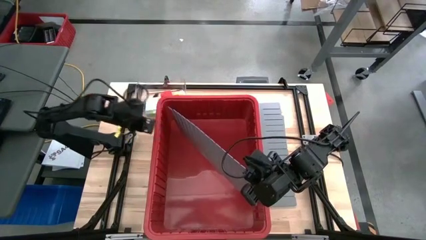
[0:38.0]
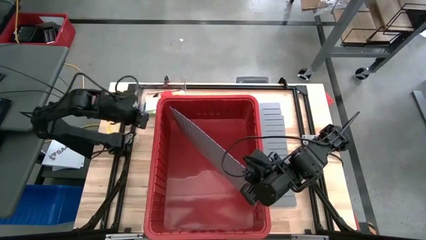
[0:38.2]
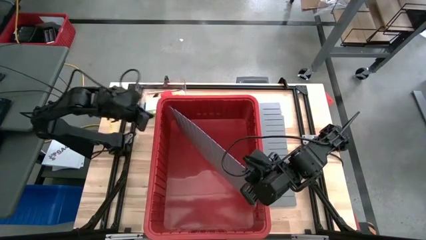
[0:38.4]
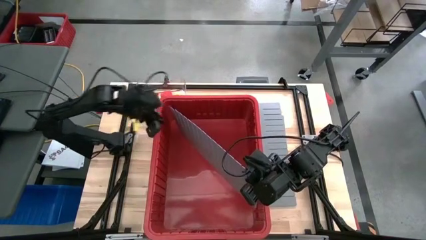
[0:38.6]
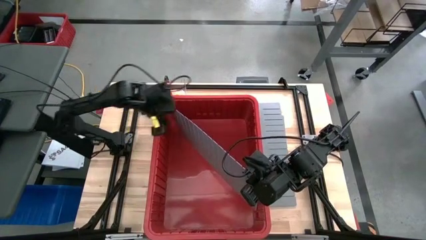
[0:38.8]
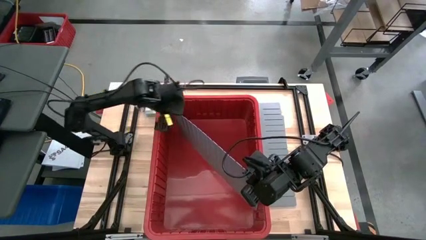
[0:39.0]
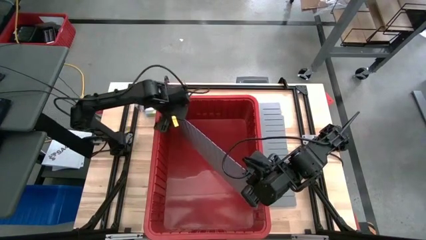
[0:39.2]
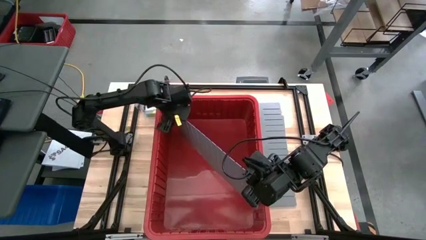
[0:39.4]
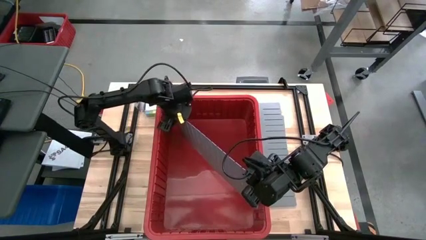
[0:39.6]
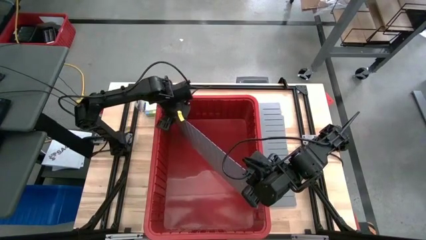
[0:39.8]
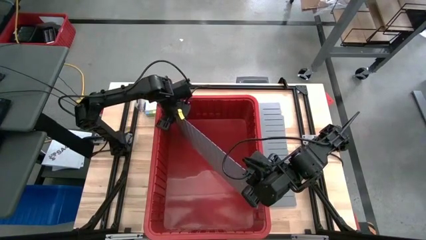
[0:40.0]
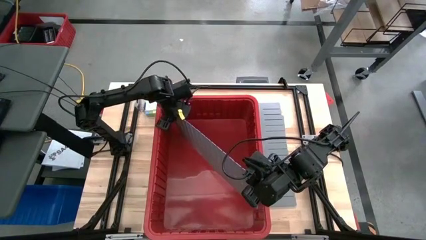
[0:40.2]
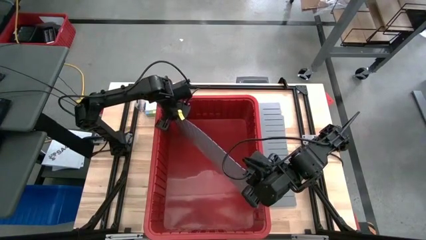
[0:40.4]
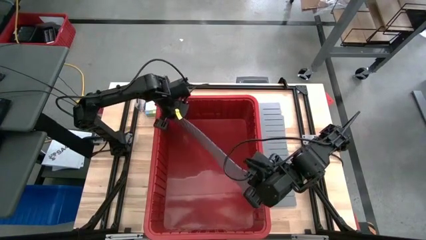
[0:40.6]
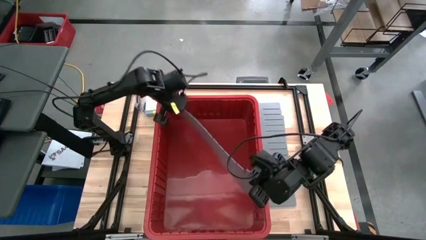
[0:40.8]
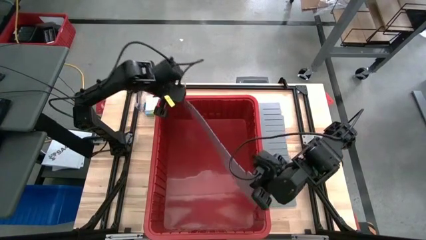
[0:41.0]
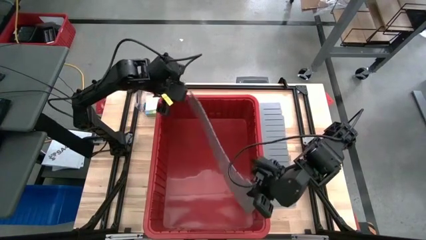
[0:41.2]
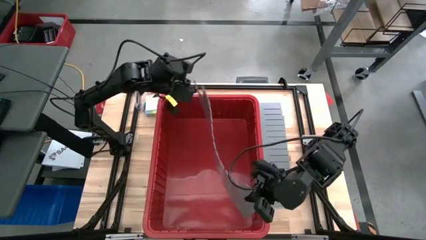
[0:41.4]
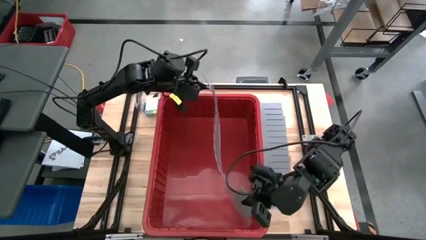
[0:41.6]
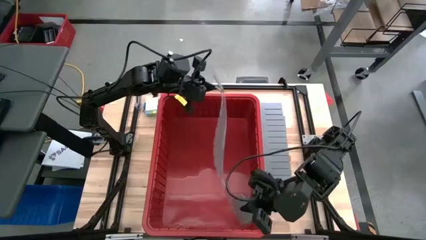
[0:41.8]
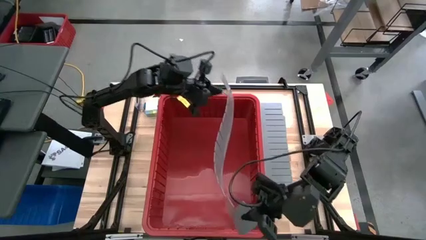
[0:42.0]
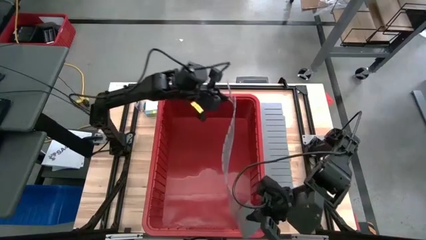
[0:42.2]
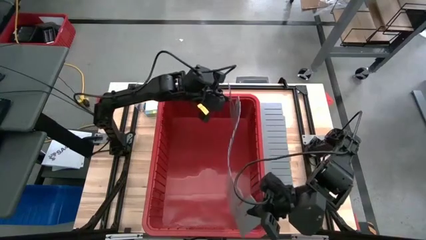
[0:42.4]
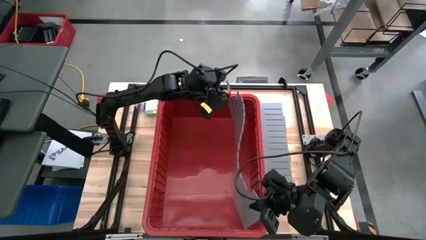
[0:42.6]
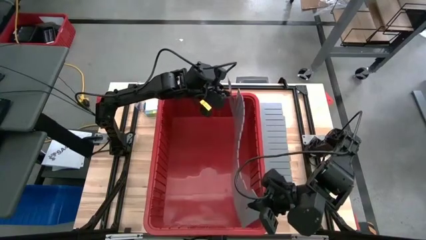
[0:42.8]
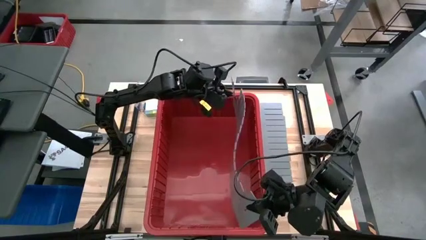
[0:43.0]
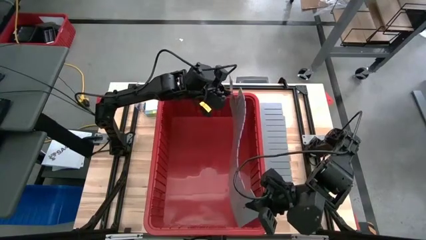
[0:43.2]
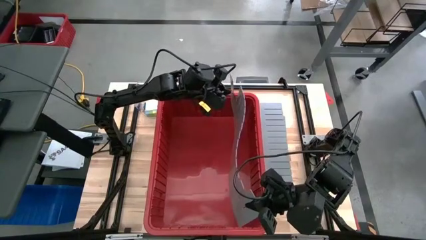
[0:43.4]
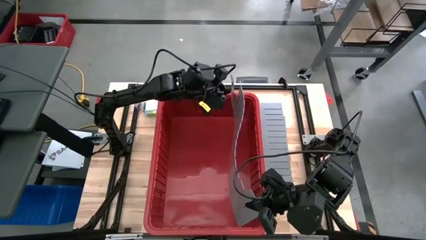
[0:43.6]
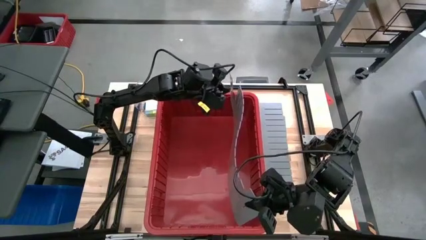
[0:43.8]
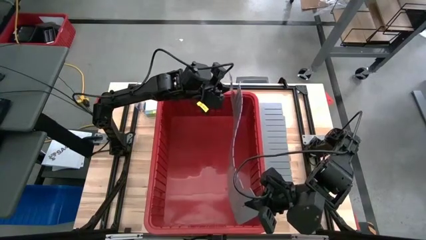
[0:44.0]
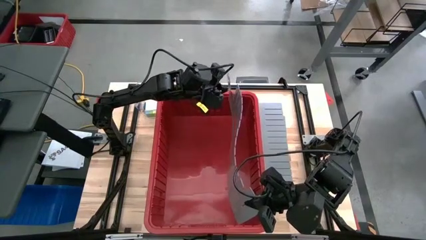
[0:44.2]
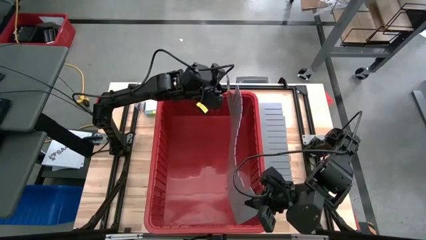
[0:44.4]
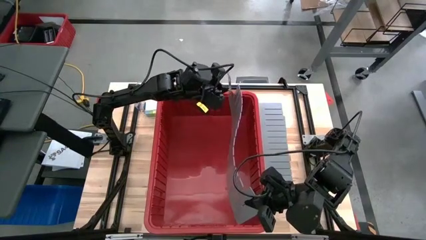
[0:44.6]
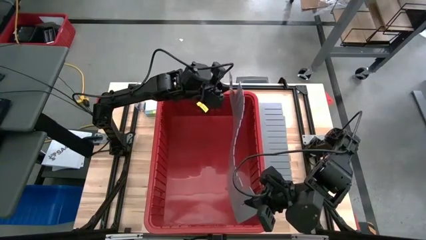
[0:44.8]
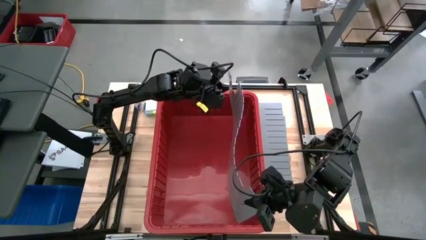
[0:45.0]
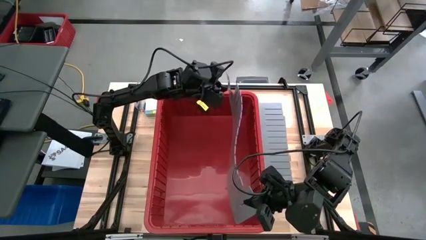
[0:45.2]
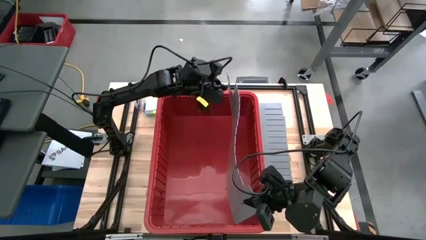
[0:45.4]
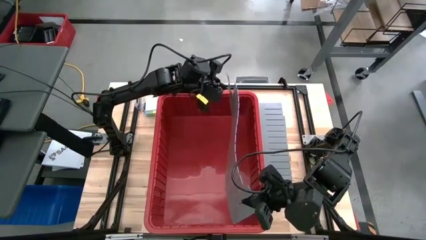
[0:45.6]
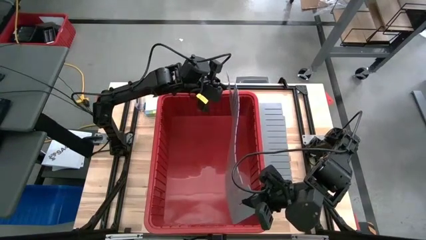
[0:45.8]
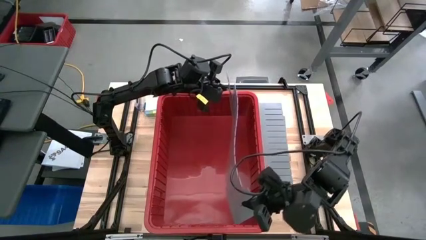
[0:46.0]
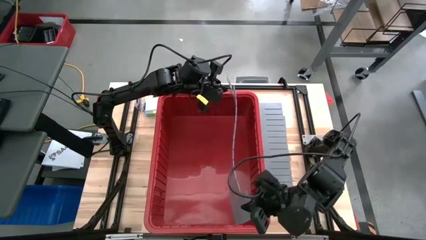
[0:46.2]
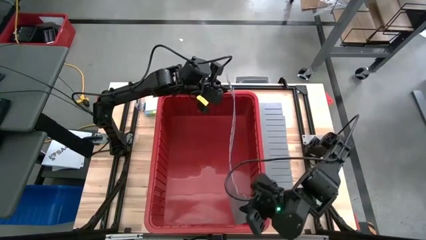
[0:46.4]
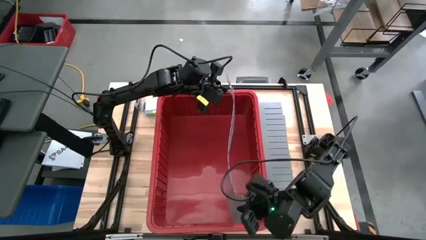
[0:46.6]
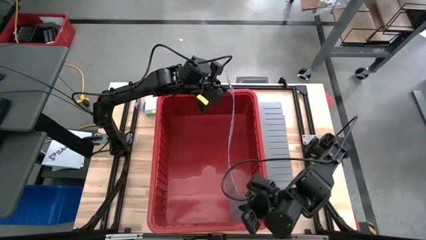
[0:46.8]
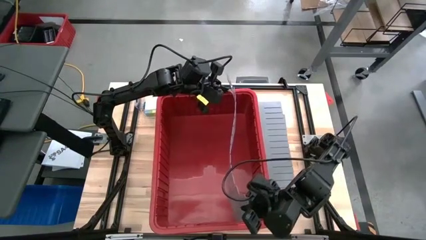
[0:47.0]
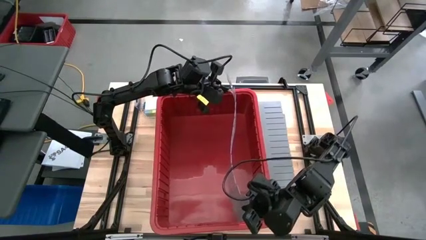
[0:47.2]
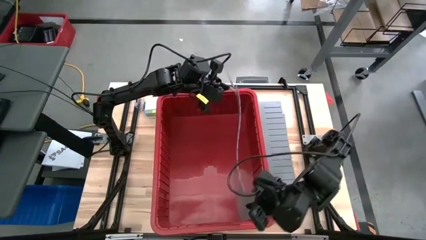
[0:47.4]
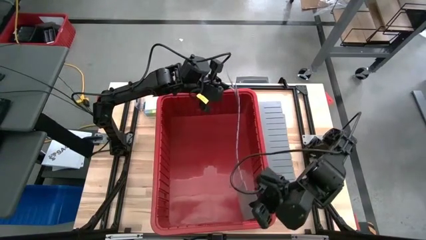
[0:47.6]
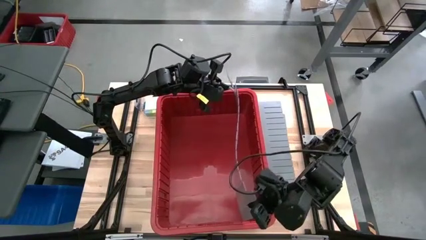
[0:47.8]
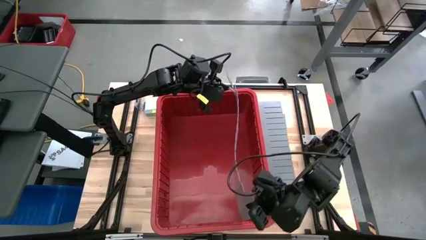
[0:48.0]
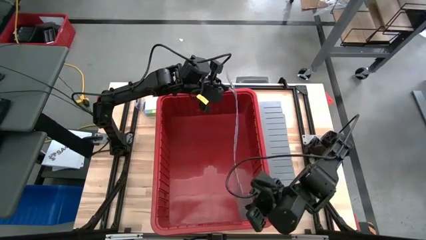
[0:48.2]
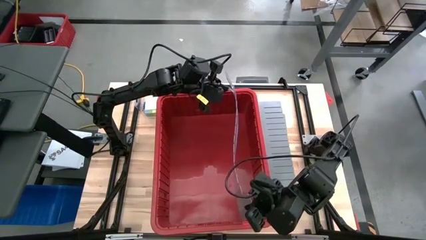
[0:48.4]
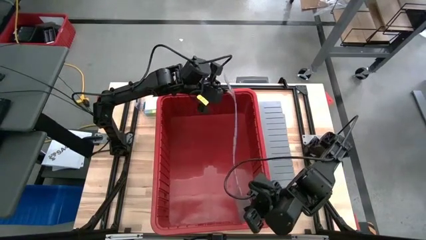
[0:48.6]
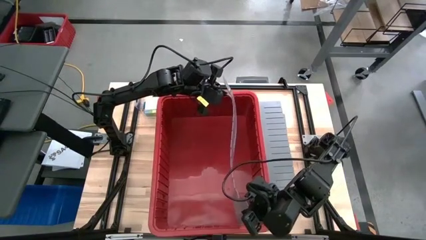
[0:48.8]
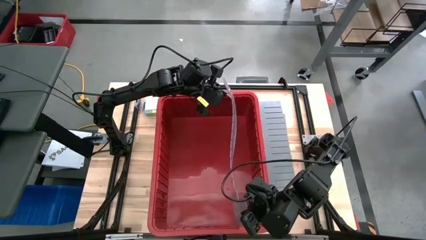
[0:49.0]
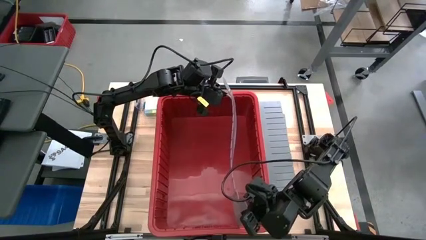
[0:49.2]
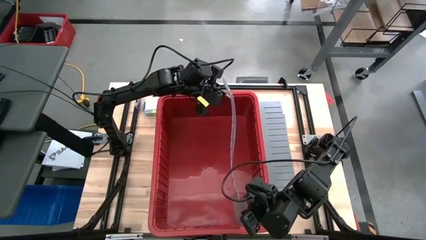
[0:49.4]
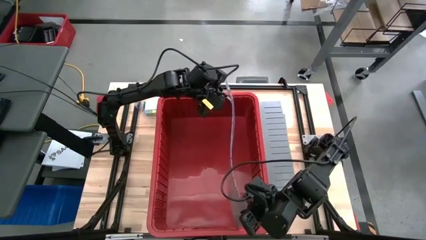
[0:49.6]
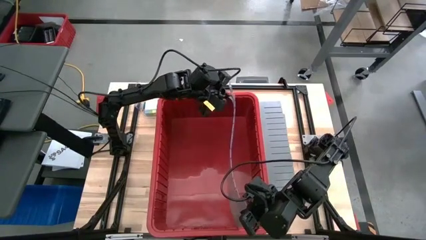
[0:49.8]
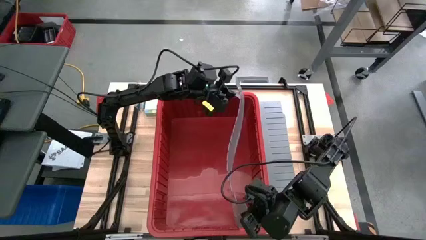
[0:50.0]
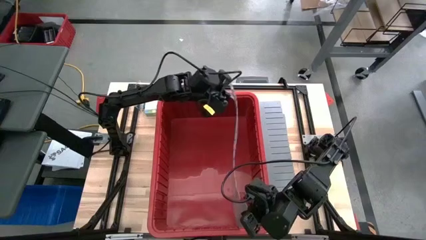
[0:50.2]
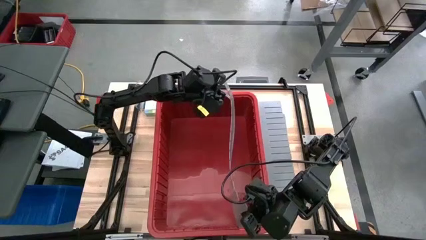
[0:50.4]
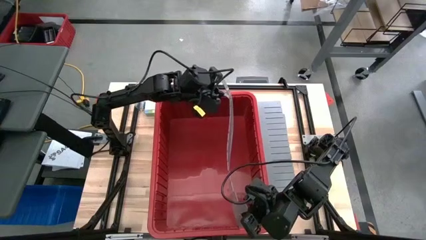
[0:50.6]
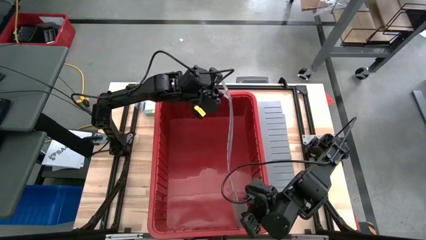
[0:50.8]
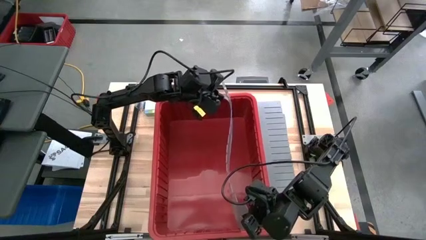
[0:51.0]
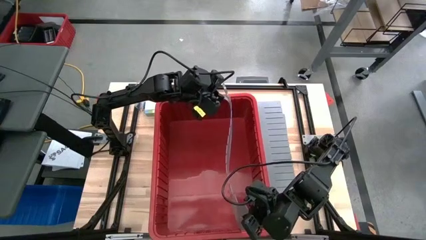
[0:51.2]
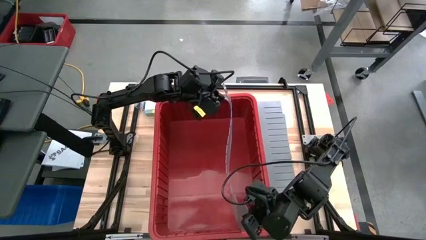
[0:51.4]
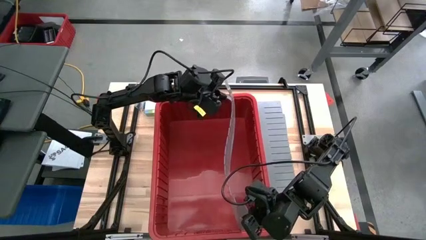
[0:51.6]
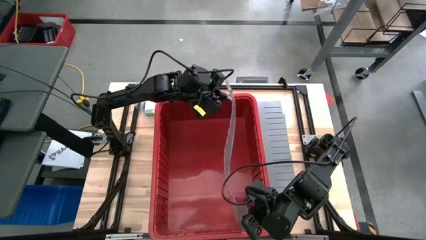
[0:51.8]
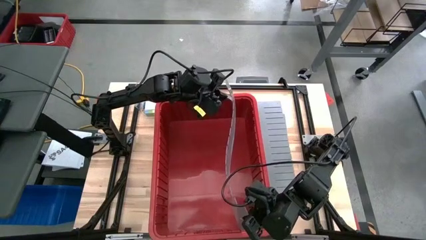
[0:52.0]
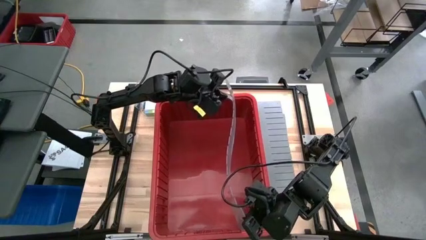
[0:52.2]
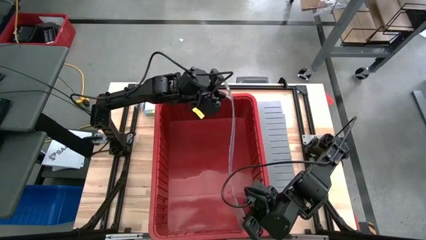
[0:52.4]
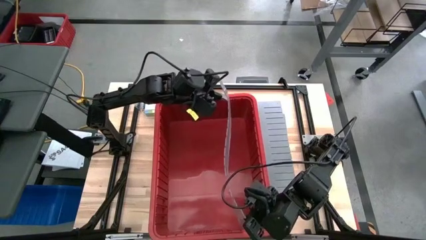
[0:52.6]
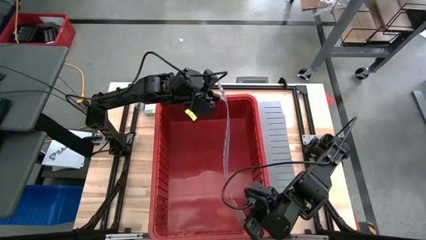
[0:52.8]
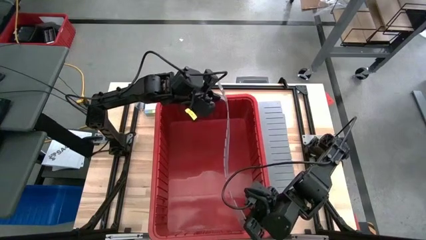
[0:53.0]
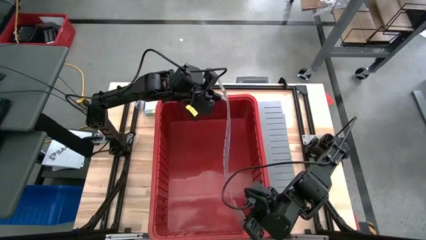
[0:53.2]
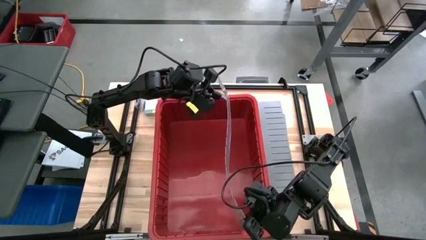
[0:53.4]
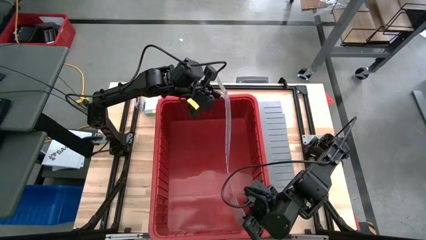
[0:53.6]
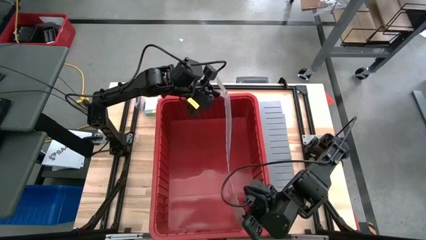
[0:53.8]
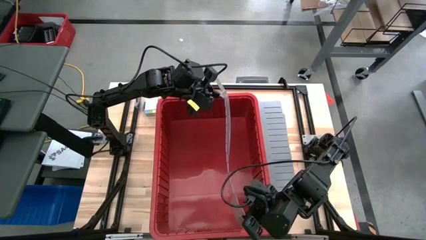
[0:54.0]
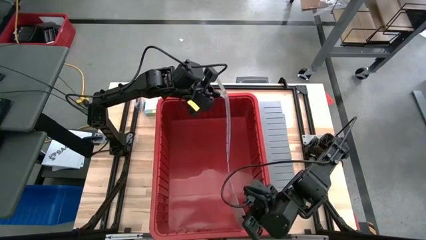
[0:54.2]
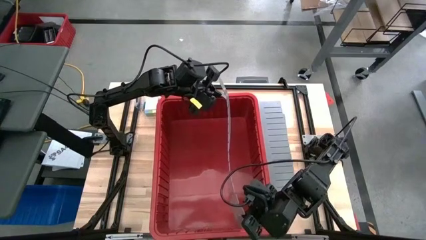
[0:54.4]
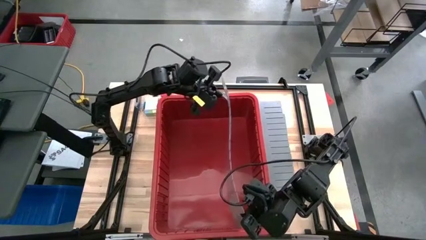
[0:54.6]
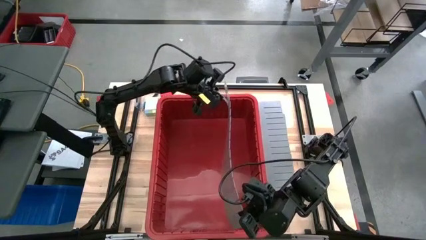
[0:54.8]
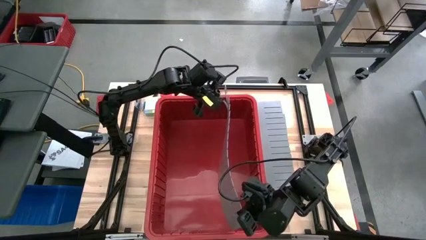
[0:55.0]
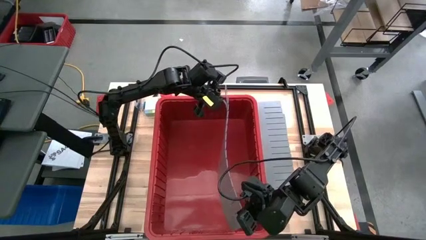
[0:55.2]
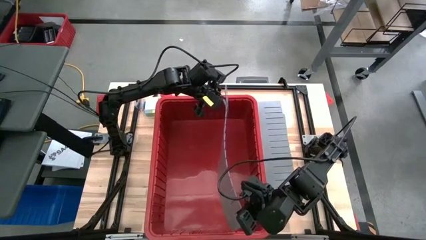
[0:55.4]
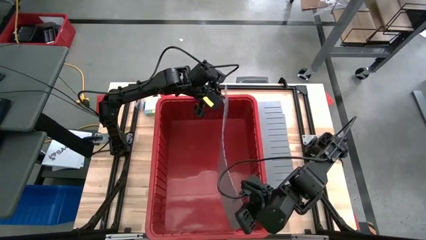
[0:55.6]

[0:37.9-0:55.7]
Task: Sort blocks
Assemble the bin divider into the red bin
